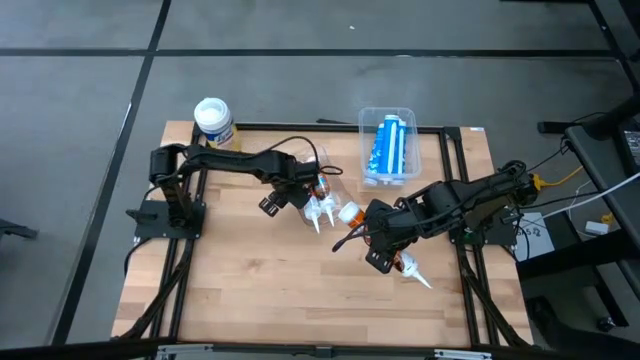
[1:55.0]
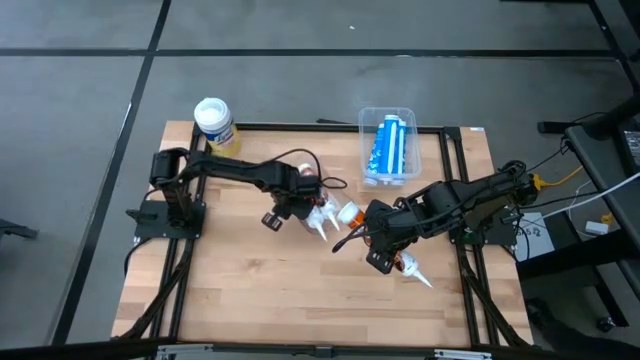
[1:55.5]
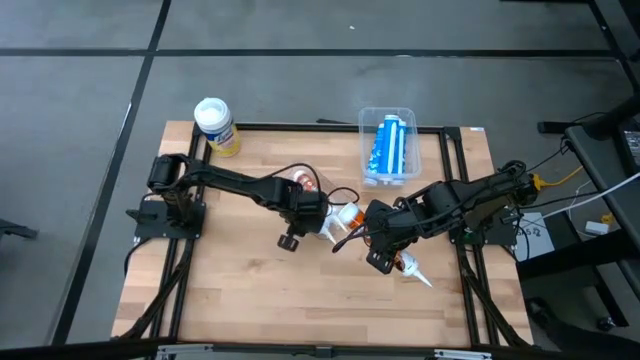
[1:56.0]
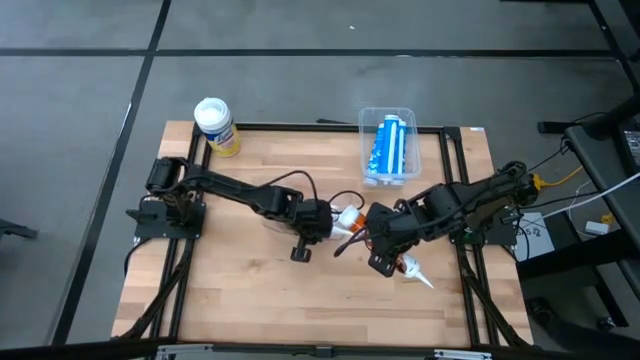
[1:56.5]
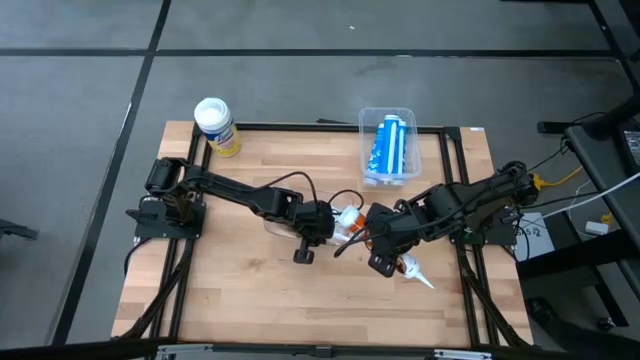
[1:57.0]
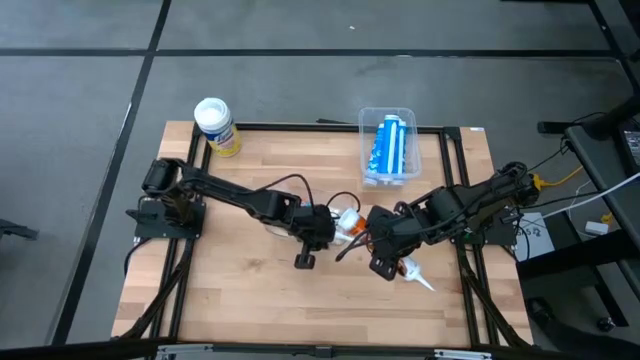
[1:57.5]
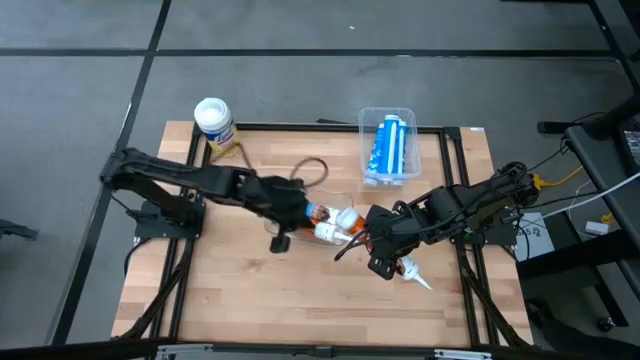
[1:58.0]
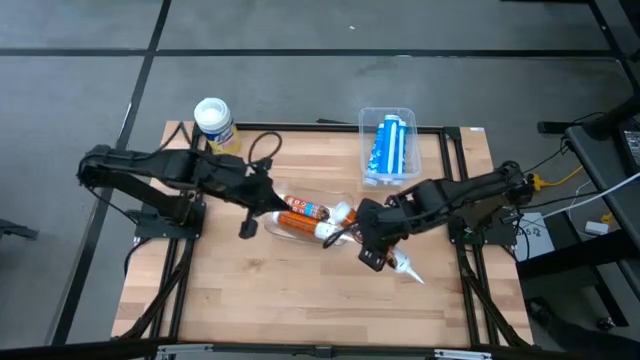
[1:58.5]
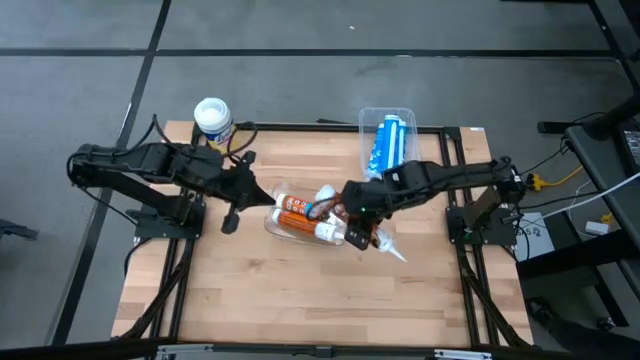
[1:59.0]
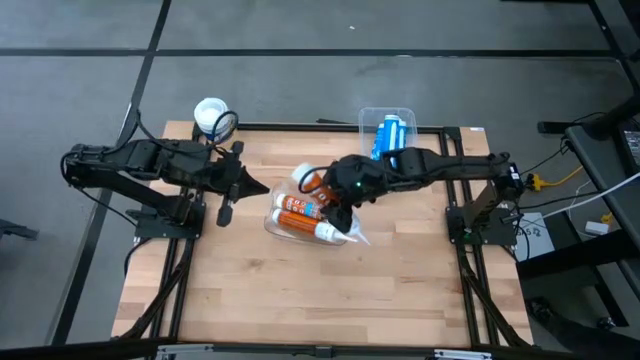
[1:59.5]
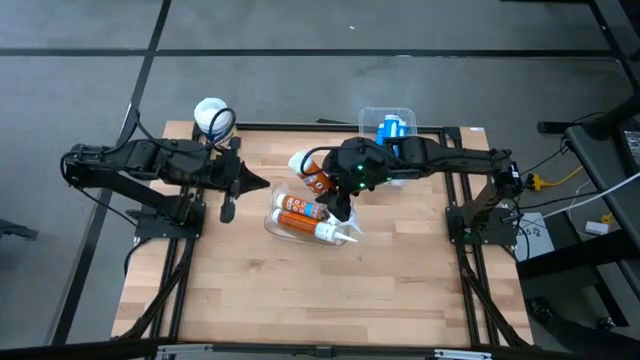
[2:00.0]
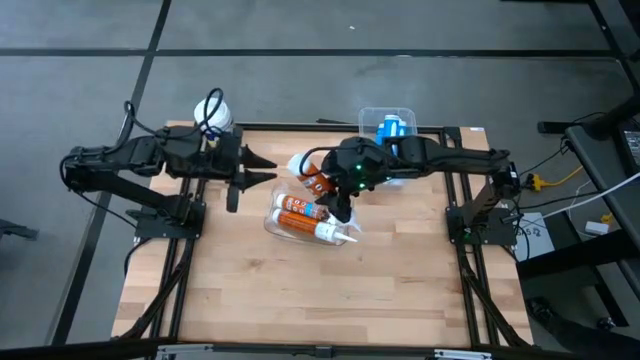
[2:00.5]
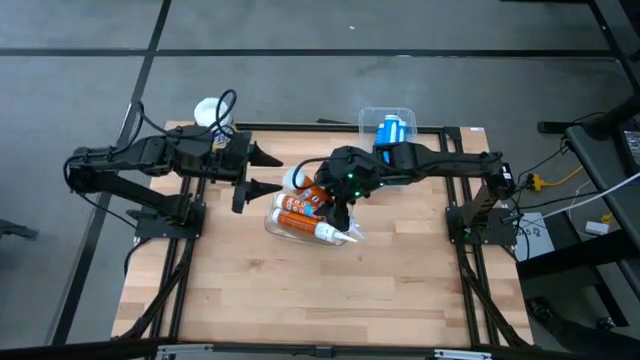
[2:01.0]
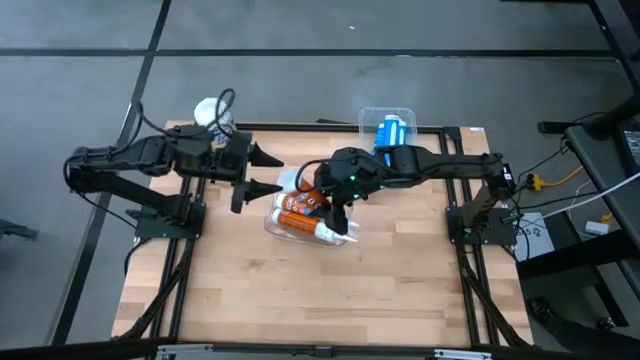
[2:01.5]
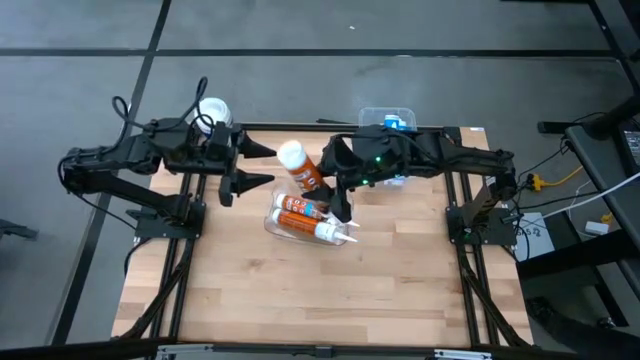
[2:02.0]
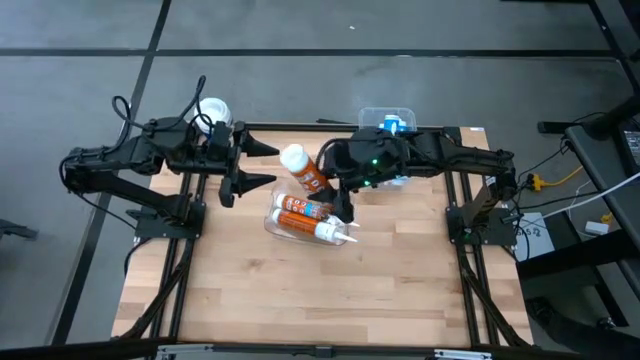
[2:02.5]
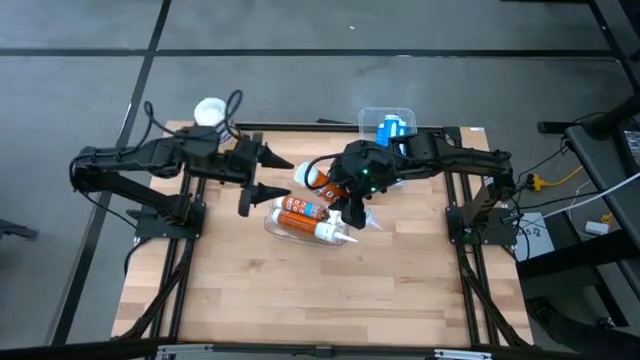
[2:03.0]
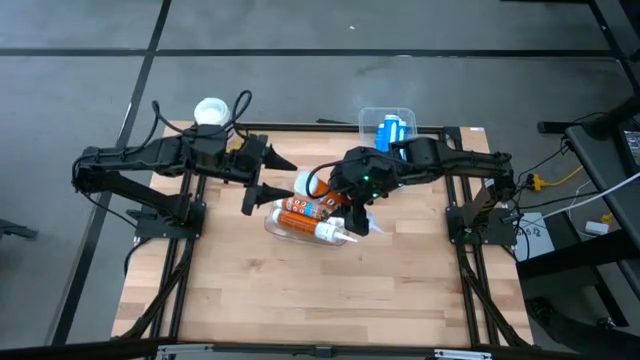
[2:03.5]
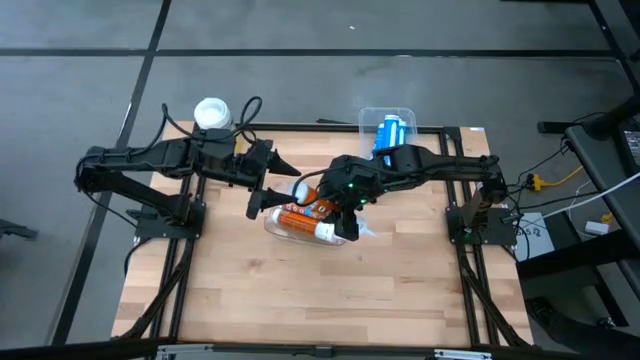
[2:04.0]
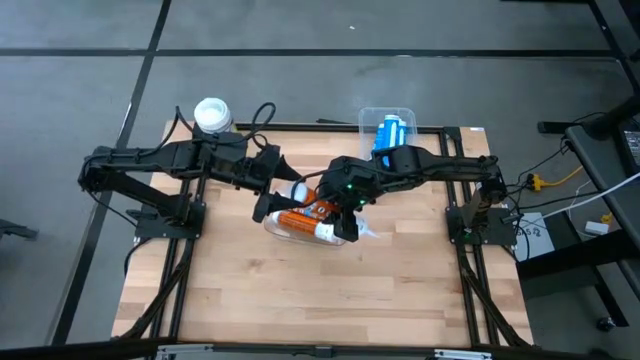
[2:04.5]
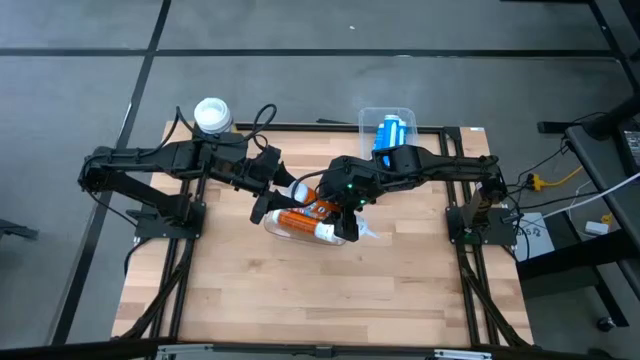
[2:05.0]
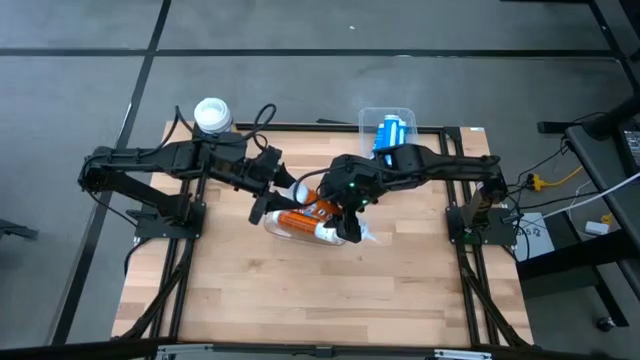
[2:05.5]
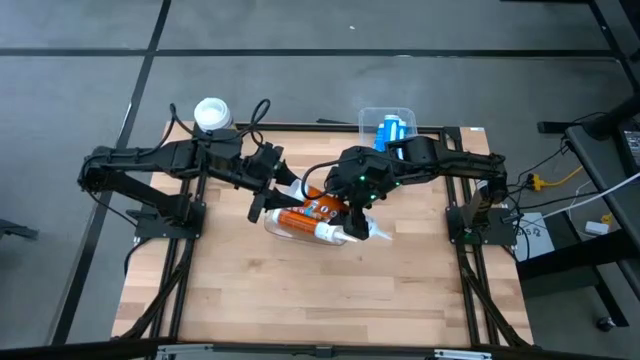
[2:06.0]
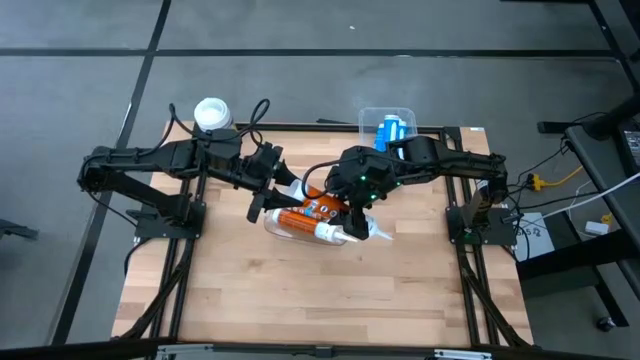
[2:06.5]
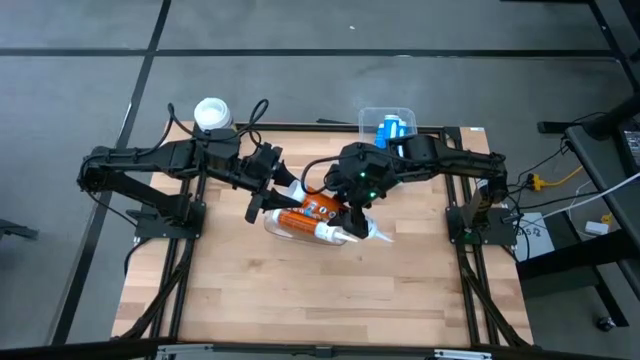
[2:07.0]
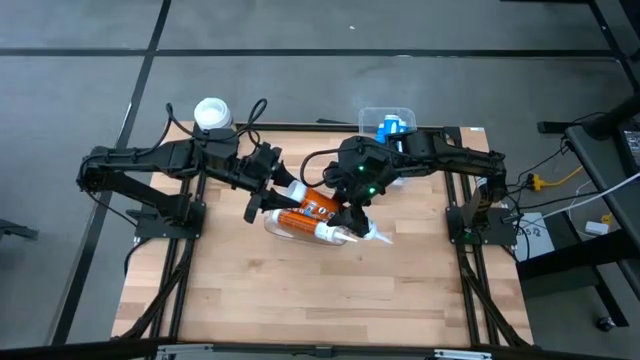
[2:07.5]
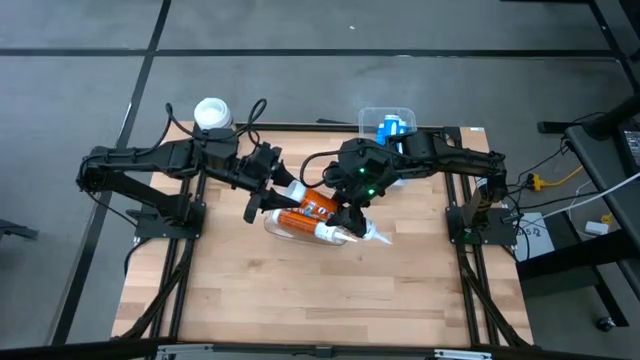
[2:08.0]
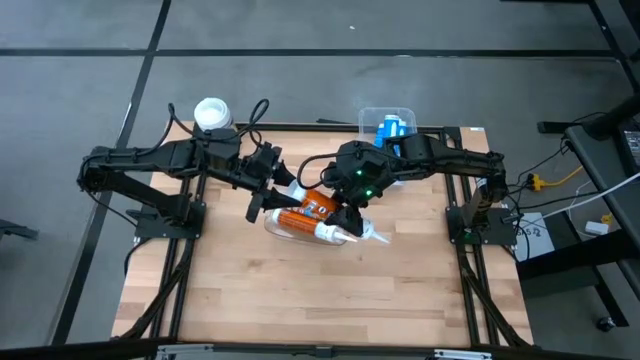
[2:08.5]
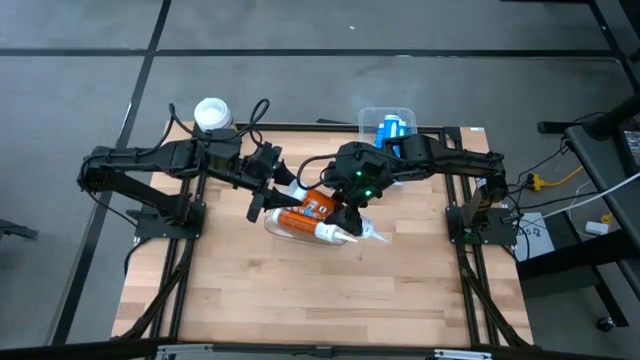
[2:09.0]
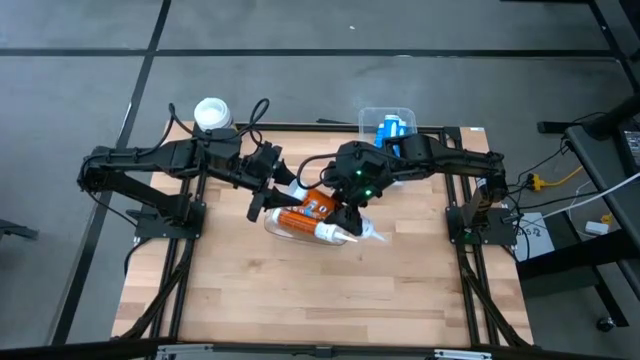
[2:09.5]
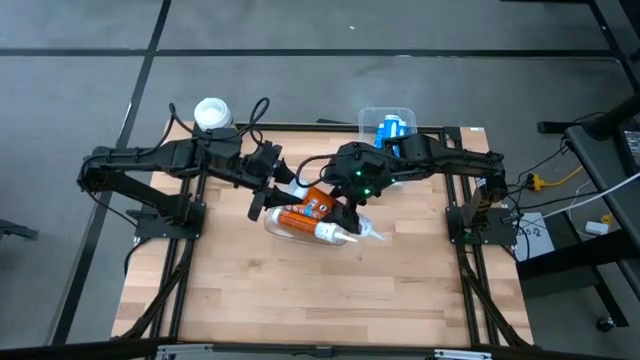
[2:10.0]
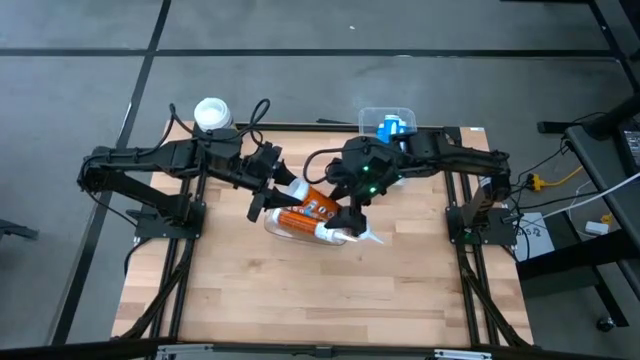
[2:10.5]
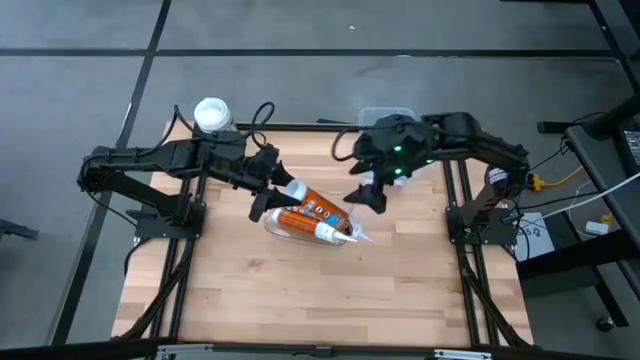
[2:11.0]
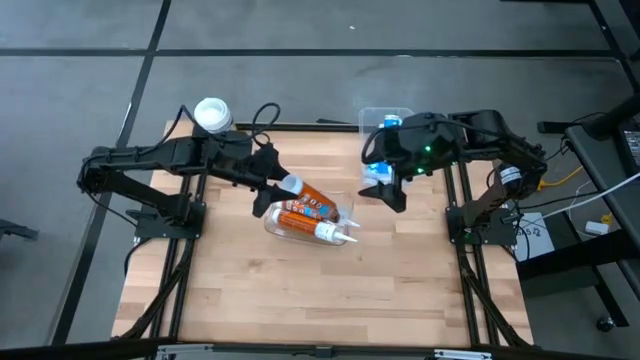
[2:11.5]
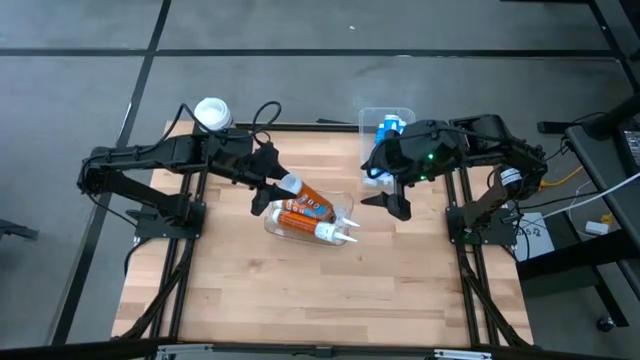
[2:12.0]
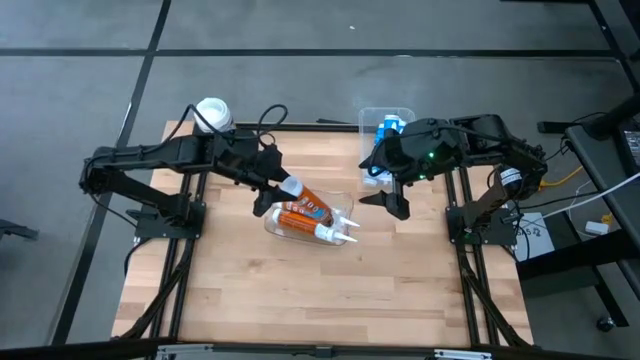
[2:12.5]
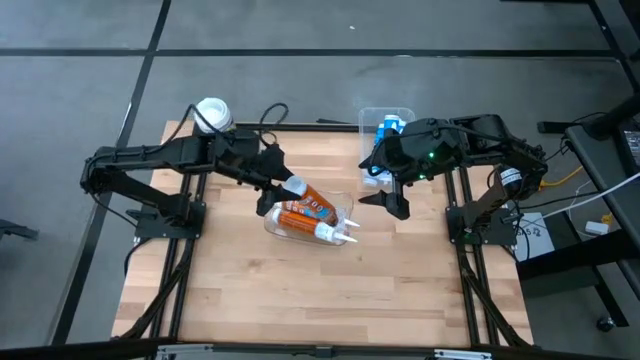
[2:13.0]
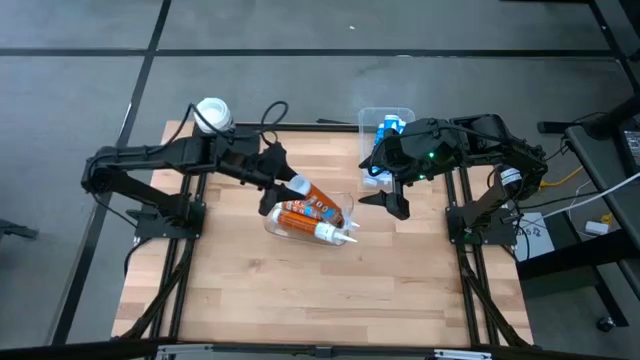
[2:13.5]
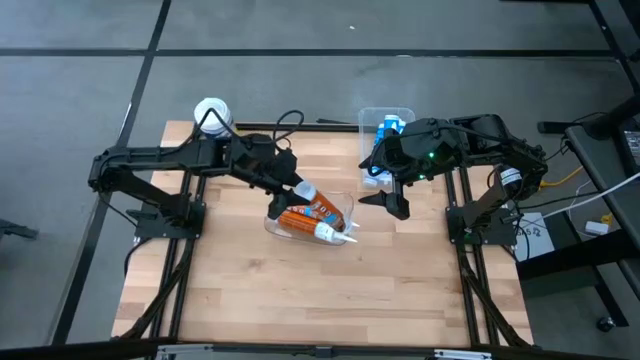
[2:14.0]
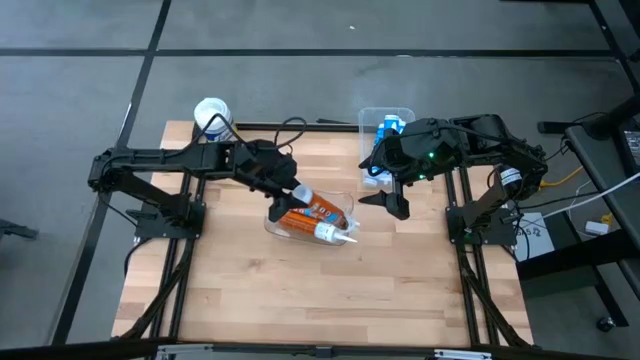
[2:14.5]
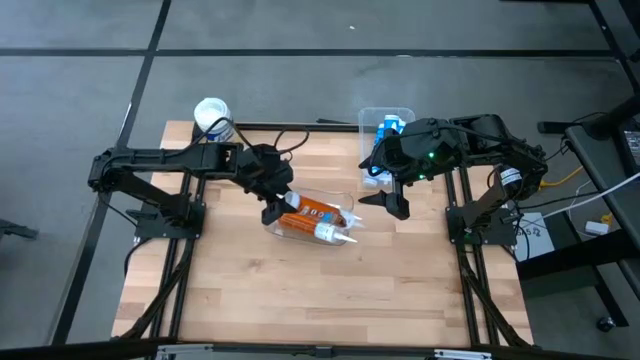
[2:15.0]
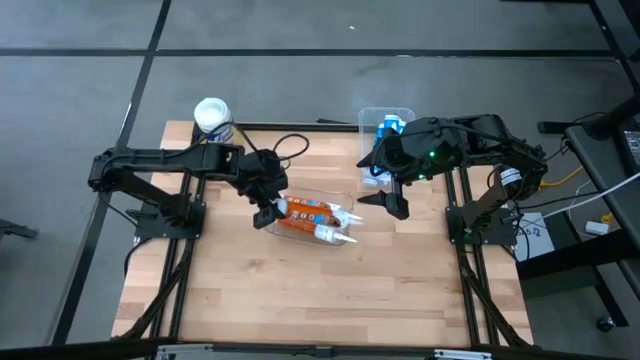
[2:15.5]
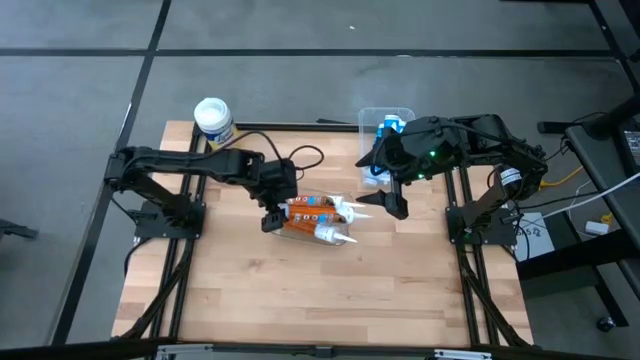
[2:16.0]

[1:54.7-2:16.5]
Task: Pick & place silicon tubes, Sealant and Lysol wipes
Put the orange sealant into the left transparent bin

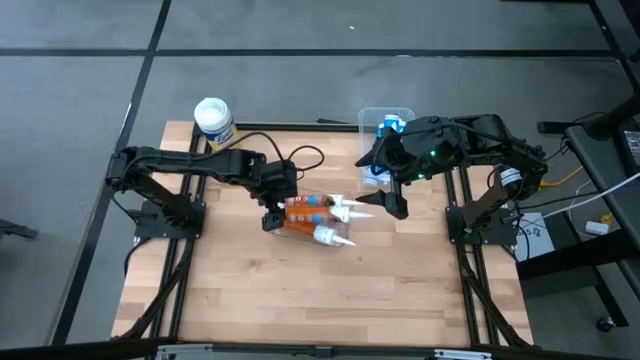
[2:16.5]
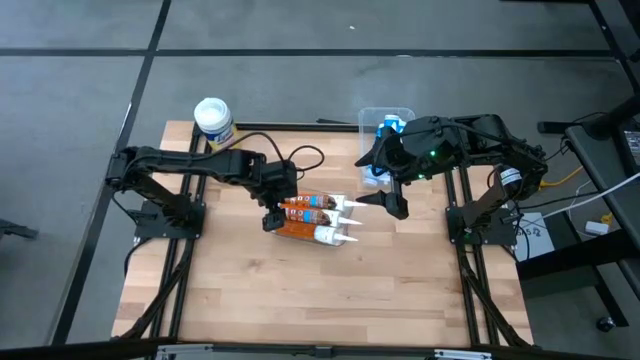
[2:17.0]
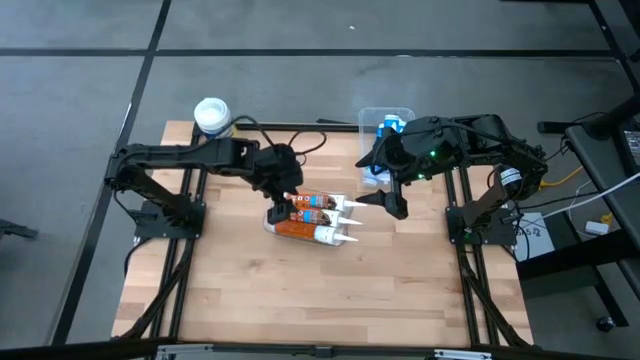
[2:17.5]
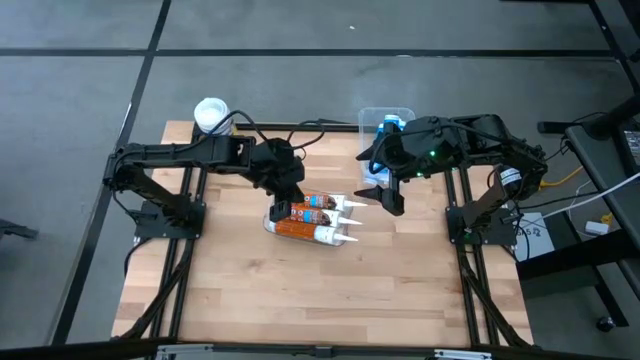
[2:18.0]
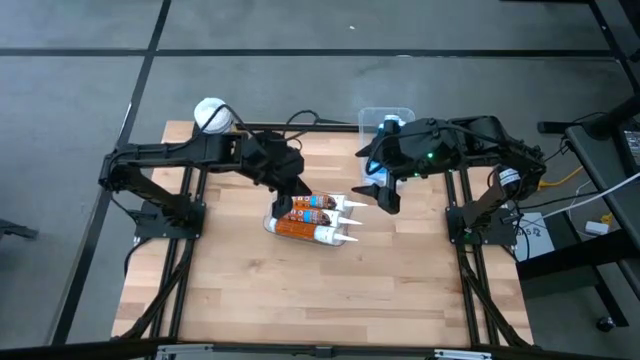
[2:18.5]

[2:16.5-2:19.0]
Return to Home Position
